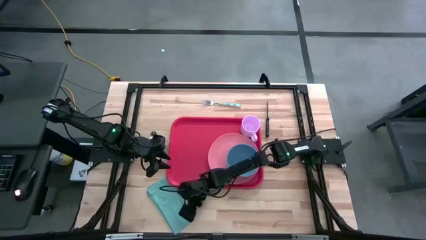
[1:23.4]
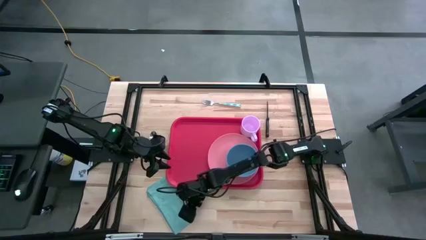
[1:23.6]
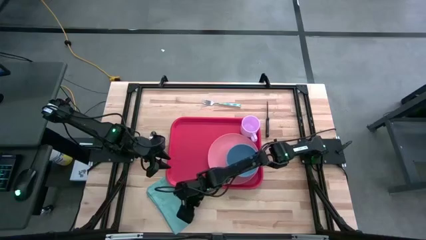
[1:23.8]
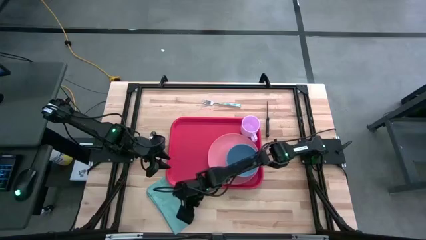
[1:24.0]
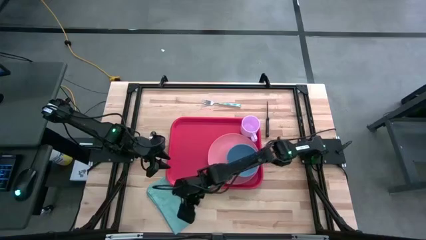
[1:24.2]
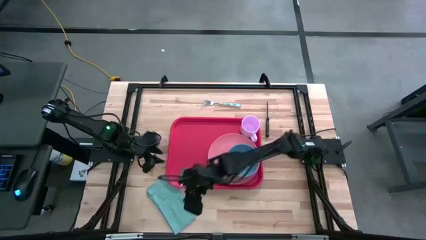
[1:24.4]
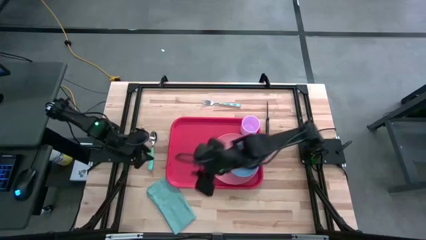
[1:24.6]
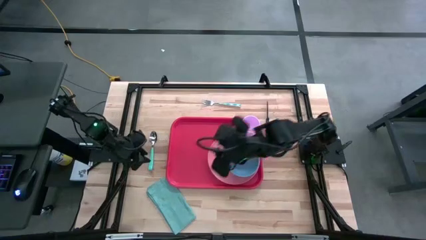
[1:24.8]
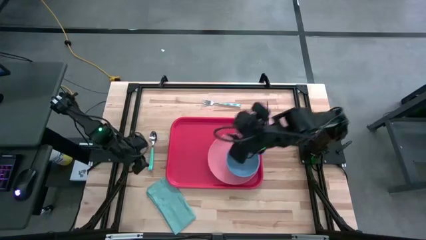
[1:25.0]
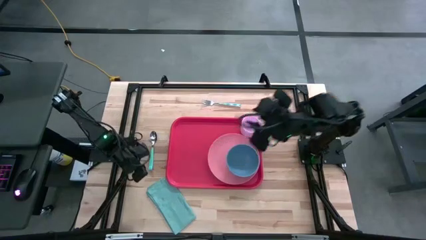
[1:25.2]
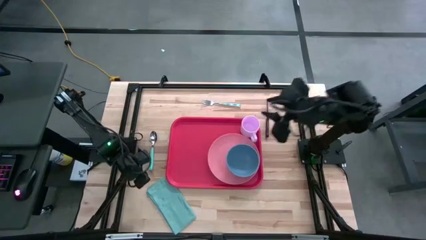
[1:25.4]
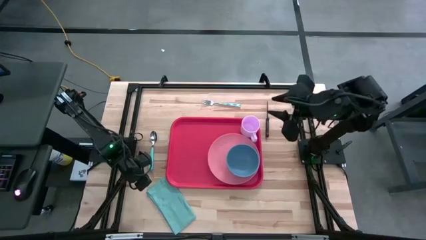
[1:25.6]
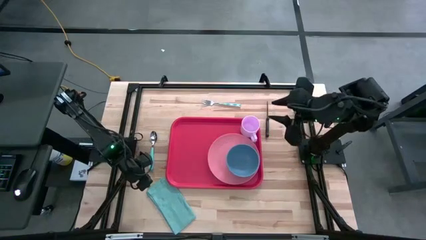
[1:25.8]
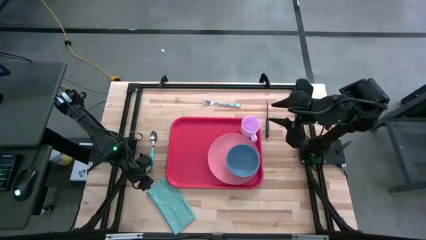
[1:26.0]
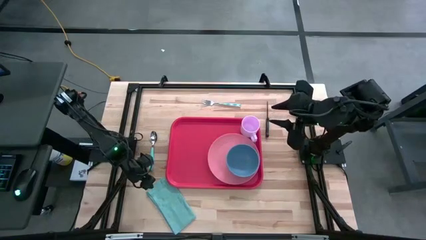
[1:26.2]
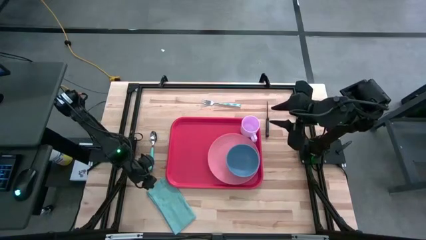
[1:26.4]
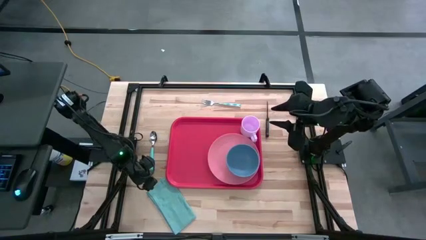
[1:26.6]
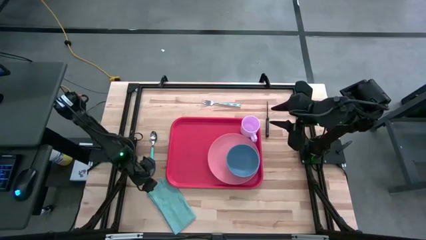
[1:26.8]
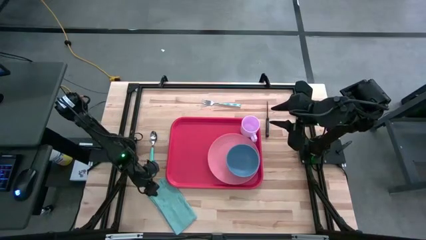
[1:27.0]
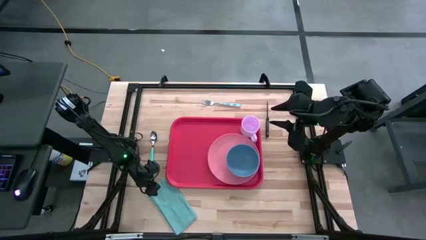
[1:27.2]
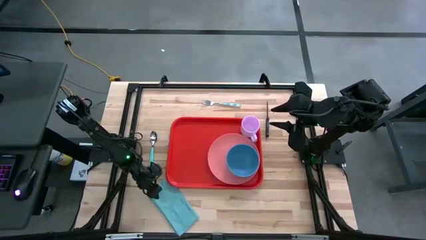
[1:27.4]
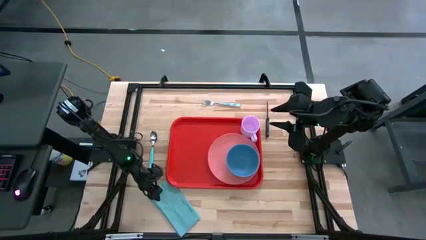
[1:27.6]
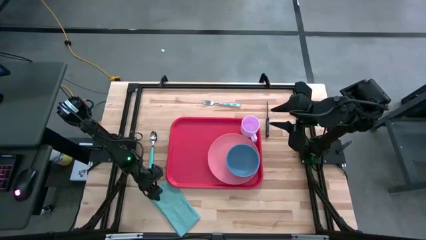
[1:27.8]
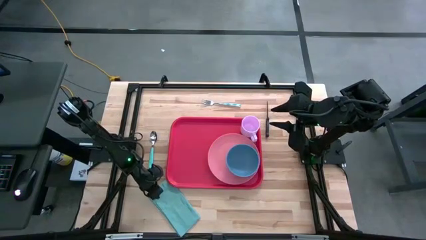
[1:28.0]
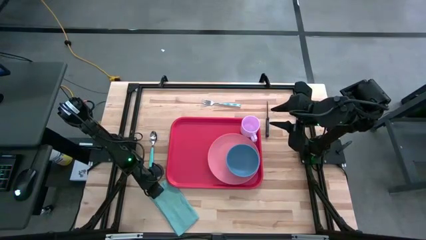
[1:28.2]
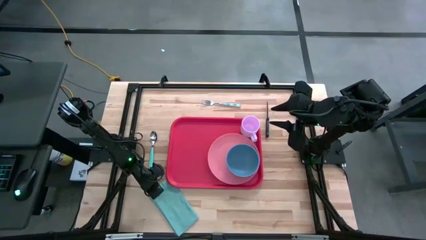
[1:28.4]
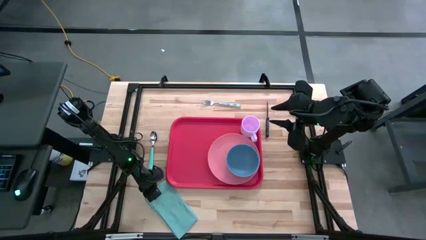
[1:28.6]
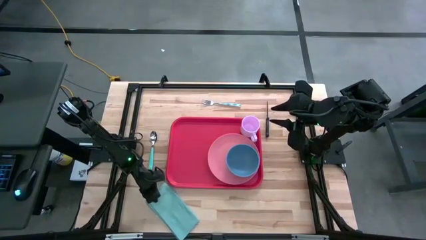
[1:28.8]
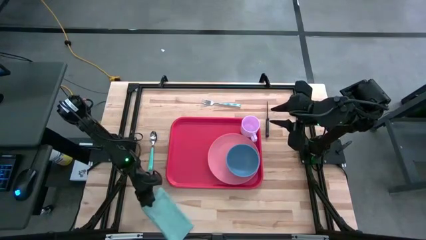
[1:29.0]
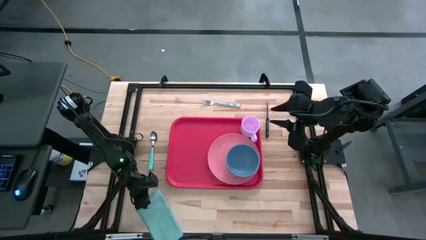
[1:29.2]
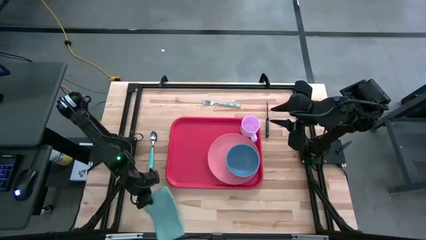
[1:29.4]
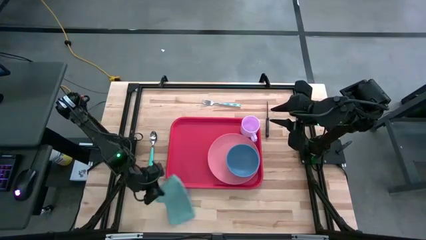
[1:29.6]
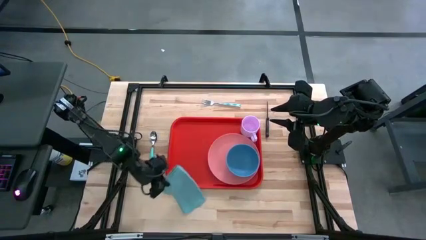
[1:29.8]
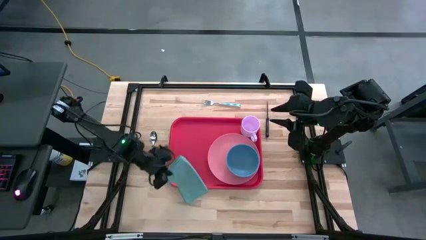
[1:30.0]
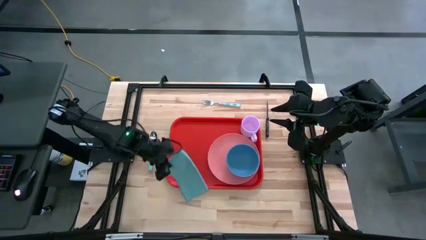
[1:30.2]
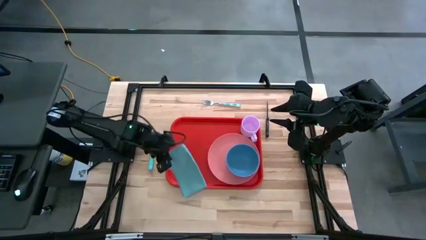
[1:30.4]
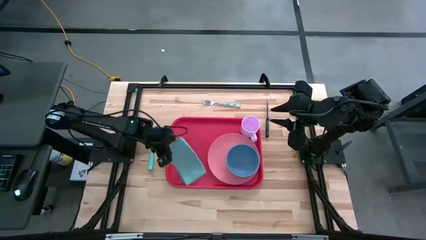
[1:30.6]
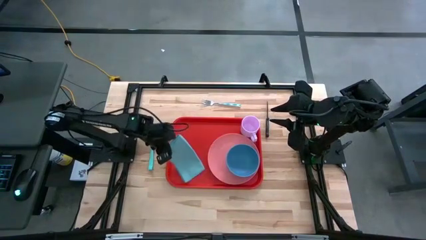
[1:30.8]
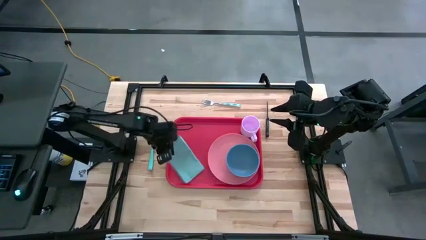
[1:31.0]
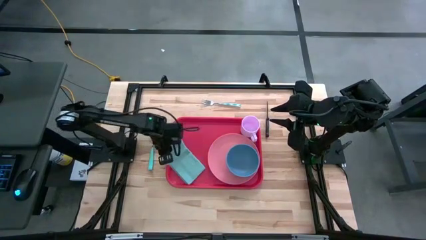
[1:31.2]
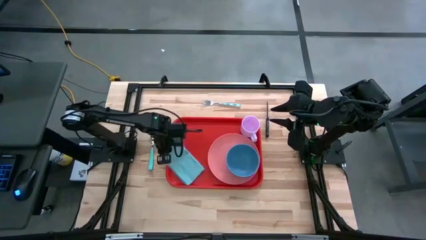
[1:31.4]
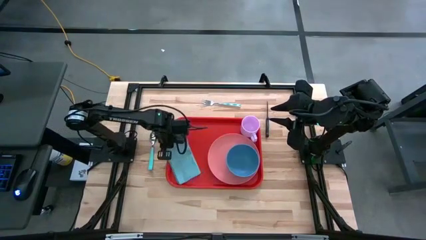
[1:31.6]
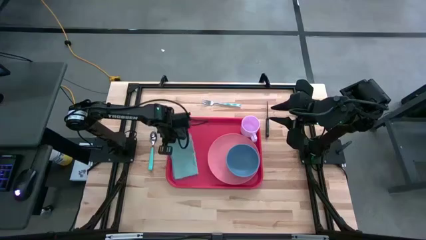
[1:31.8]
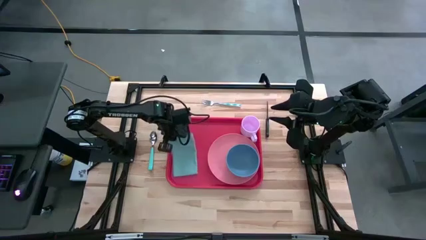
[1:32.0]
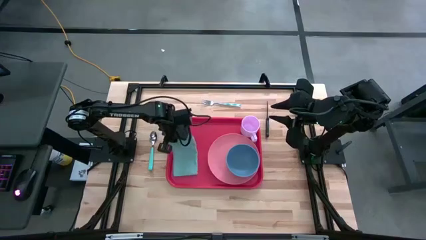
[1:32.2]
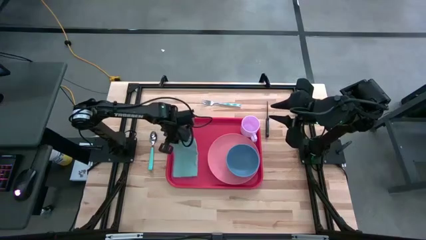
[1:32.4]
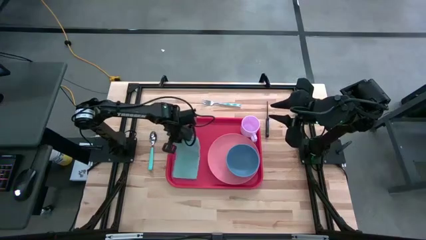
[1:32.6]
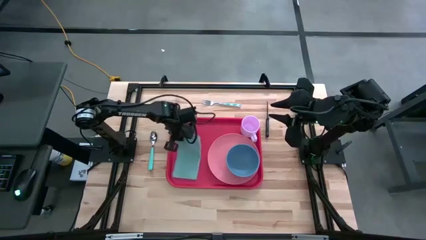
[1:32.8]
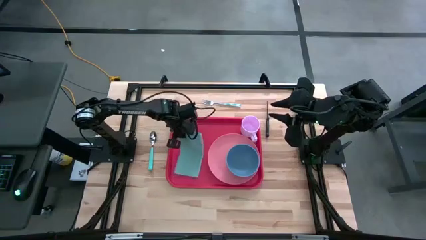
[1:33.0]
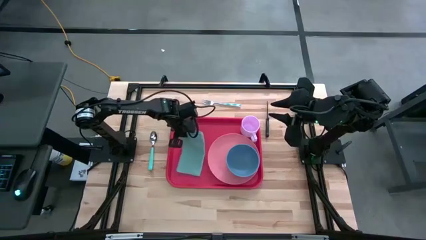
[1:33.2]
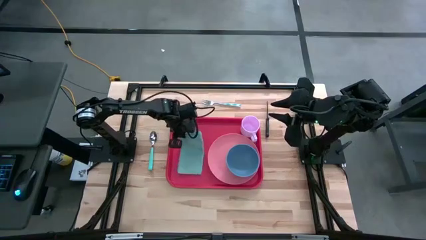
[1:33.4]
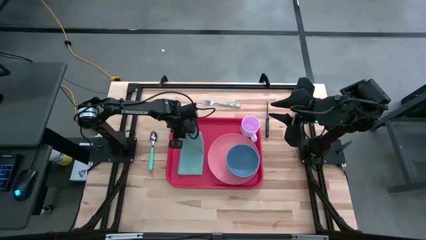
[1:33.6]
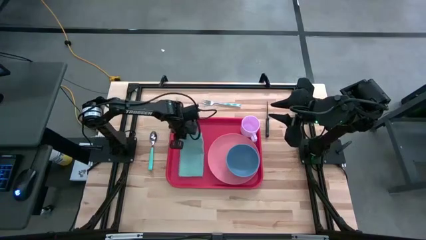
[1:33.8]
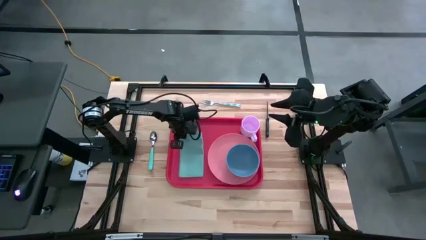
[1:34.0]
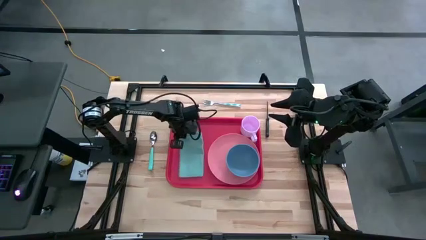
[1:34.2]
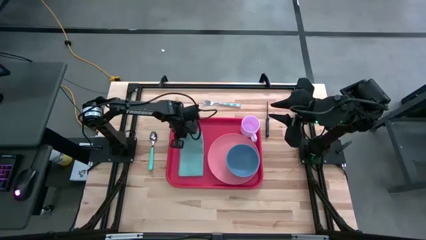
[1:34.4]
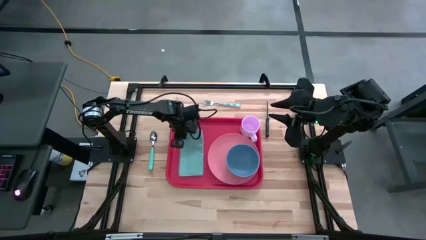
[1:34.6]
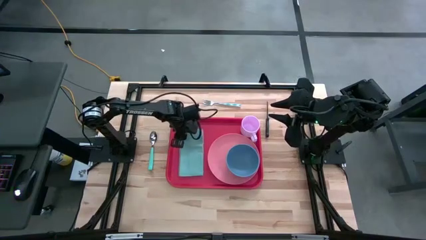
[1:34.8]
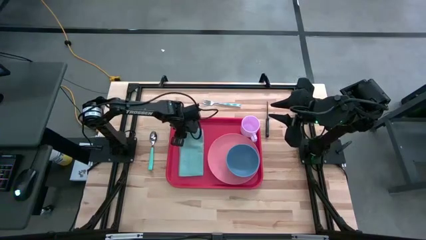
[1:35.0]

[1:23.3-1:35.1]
Task: Set up tray
Put the blue napkin on the red tray to the left of the pink plate

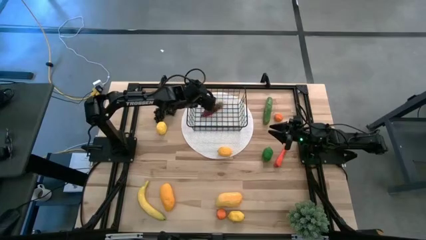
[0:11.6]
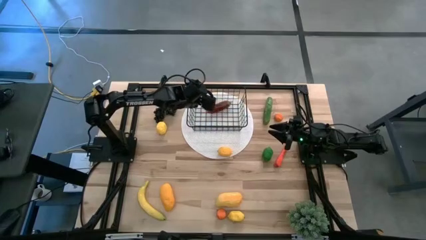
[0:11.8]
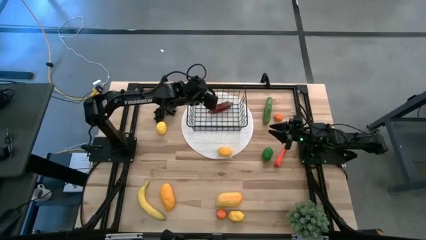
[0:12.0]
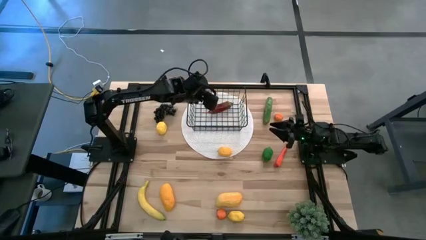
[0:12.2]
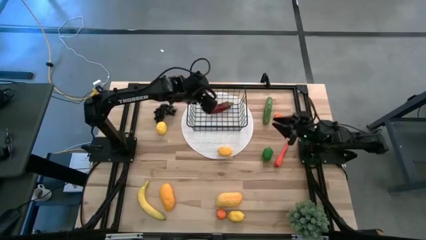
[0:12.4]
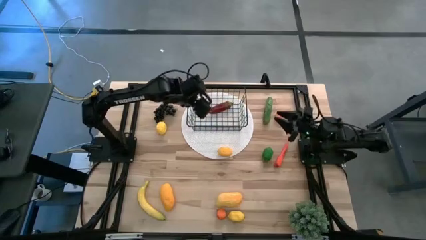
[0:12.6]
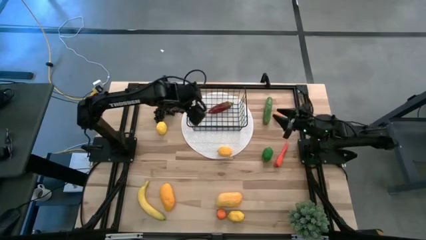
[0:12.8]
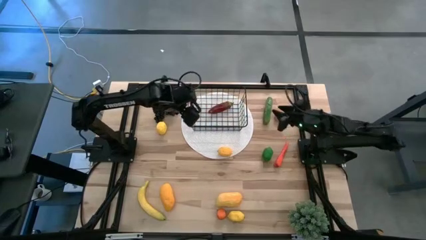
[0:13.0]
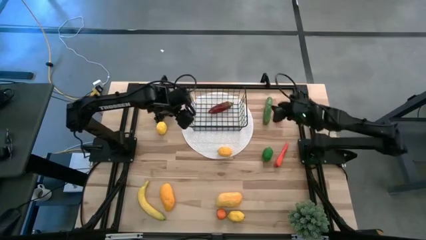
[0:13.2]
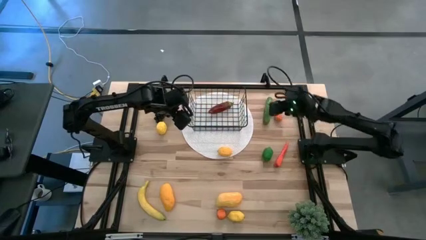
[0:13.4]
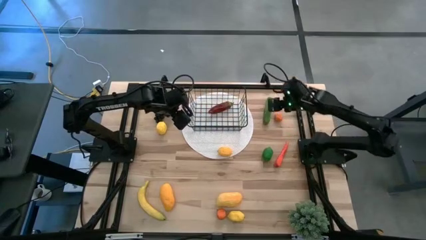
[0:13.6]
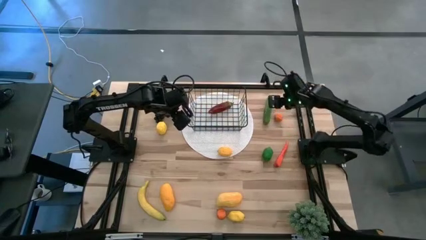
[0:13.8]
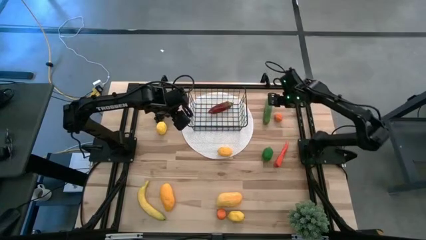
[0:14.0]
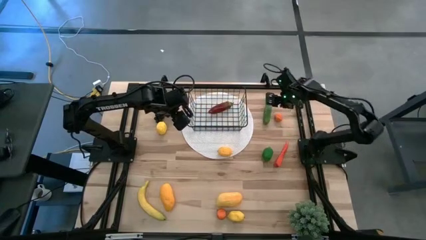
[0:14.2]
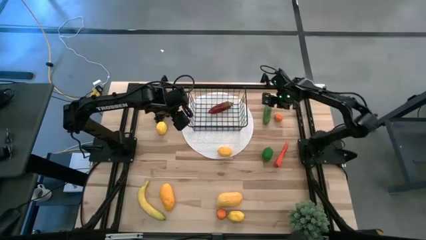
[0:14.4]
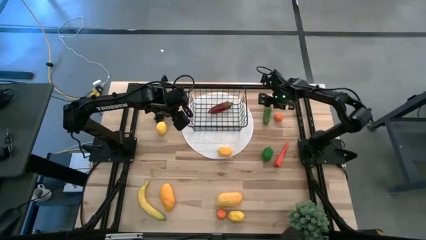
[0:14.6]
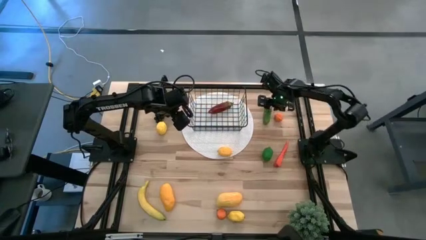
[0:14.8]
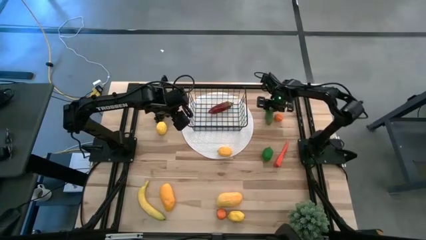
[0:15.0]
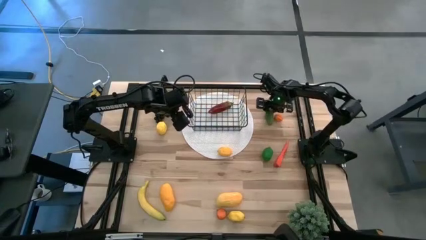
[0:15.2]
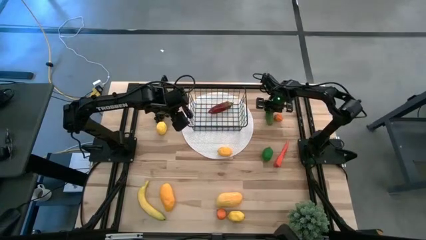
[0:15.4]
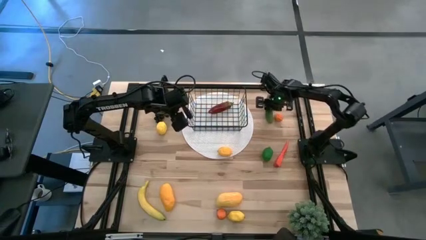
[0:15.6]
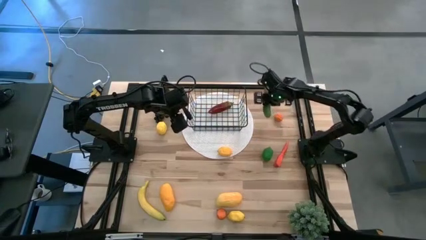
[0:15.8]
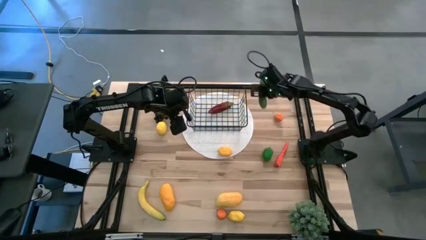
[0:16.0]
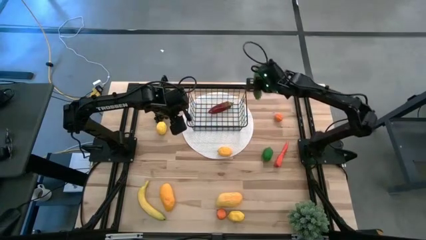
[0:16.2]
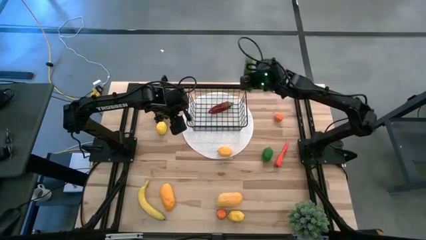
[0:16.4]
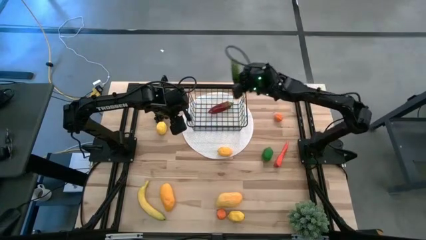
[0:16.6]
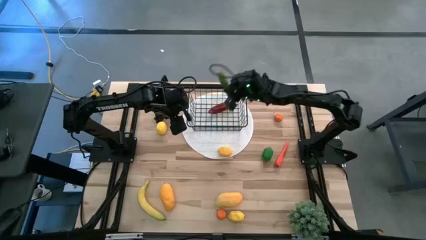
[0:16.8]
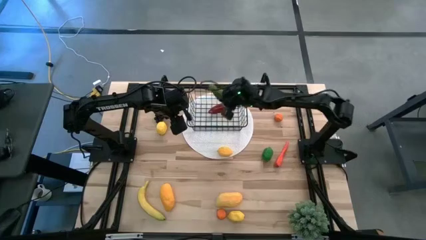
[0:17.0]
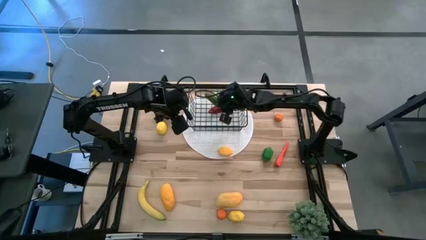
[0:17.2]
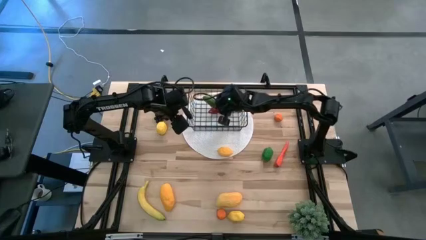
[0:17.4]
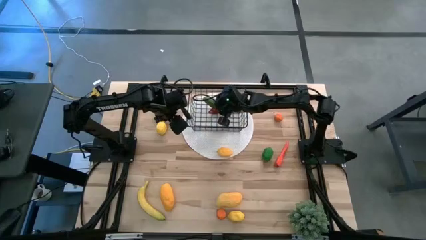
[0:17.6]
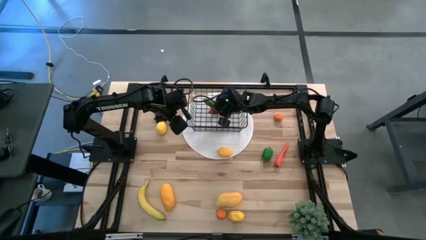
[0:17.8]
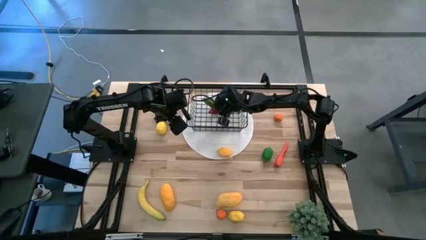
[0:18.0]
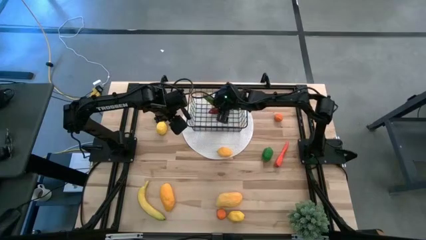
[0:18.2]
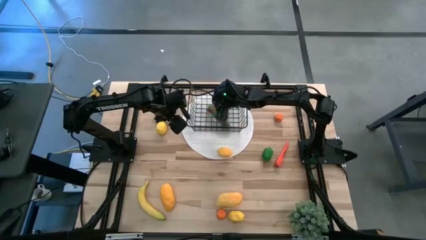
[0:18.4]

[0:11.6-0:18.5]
Task: Build produce basket
Put the green cucumber into the black wire basket
